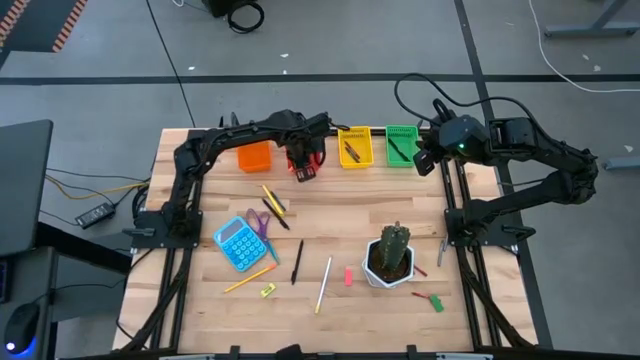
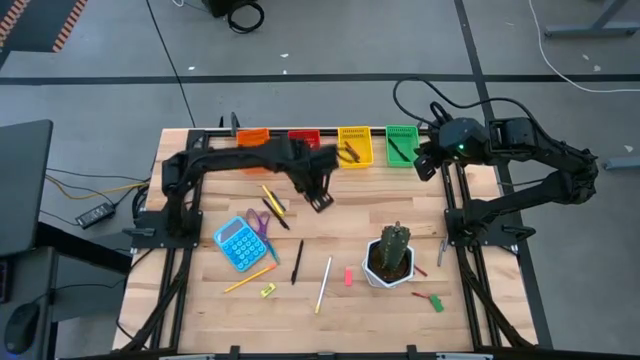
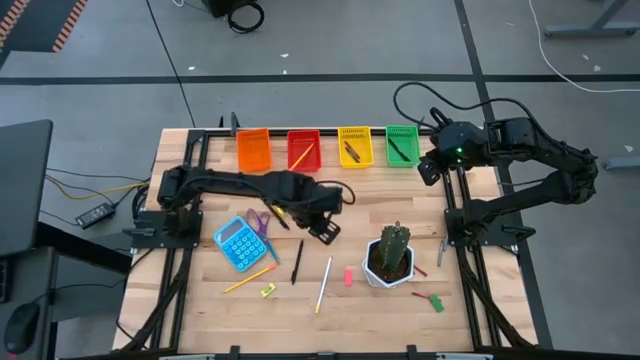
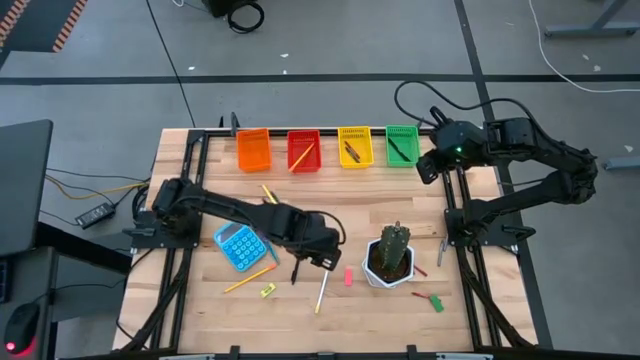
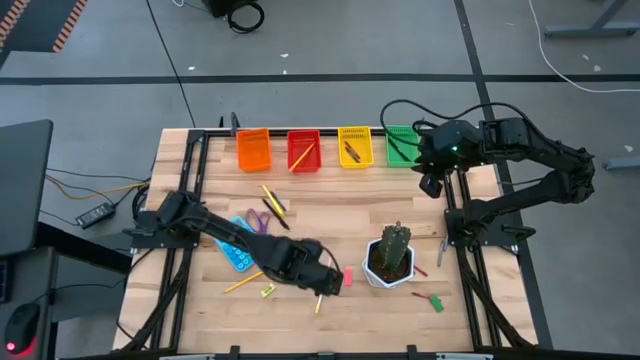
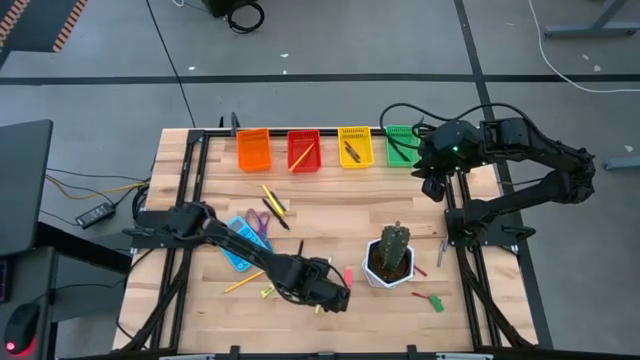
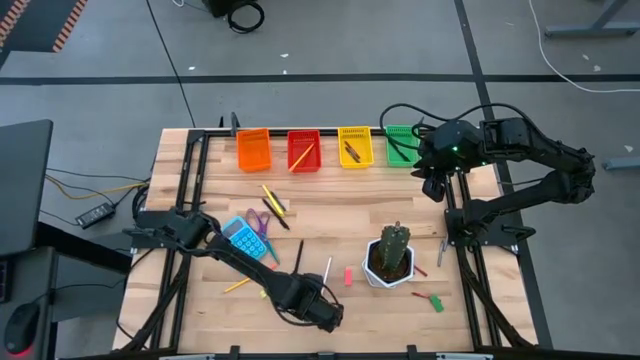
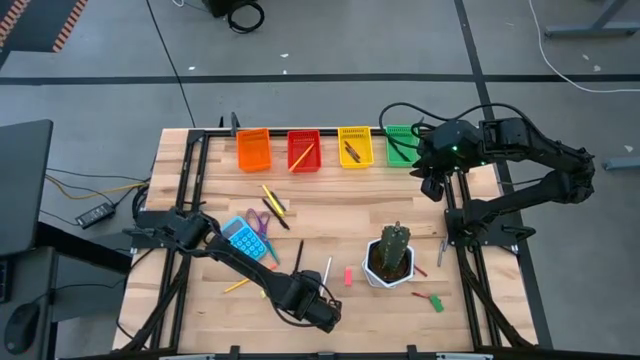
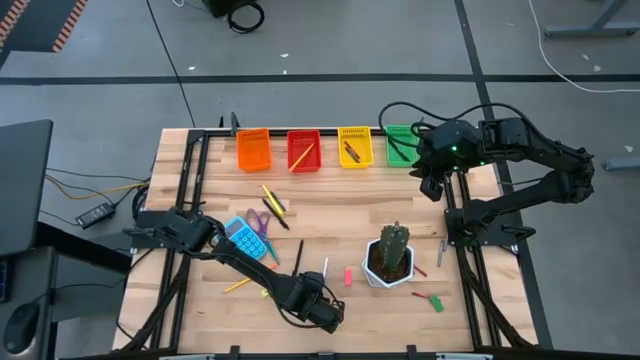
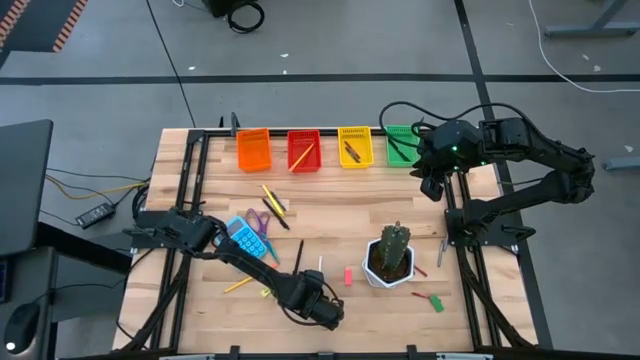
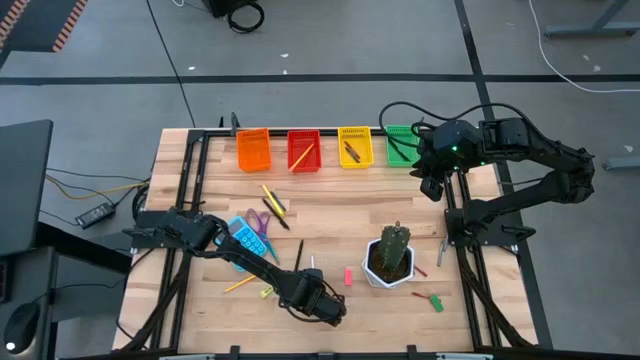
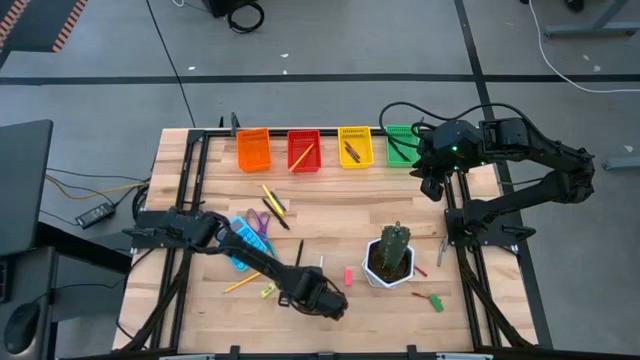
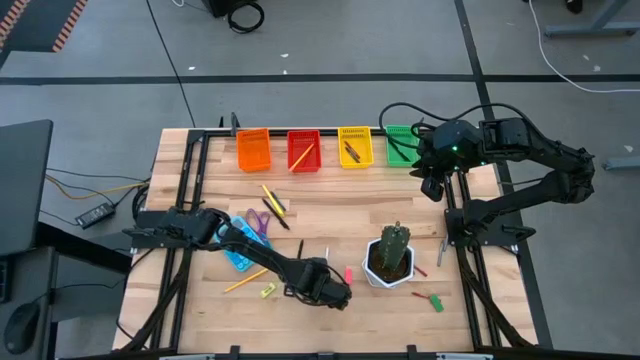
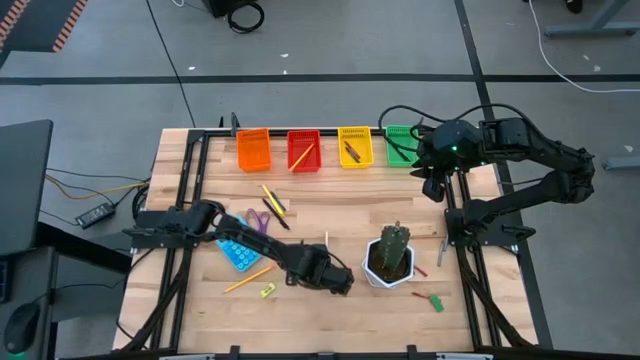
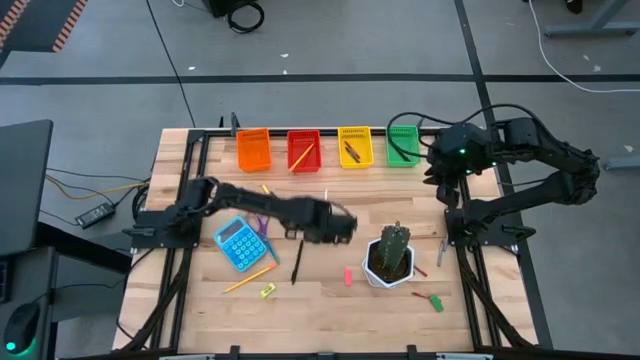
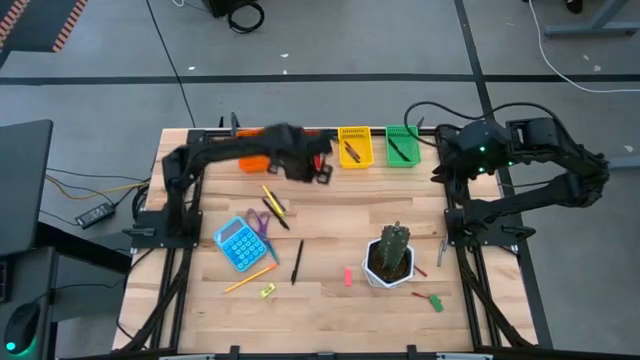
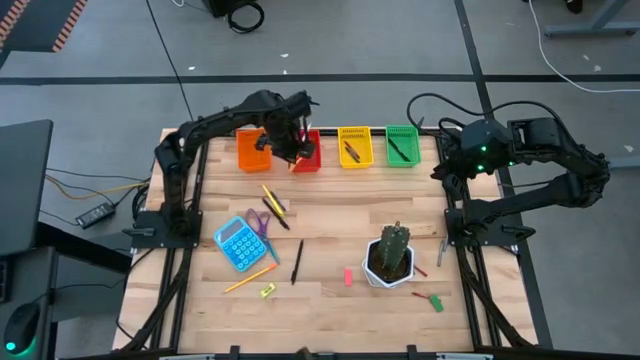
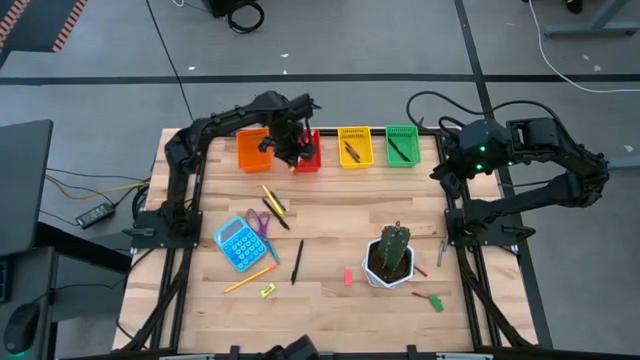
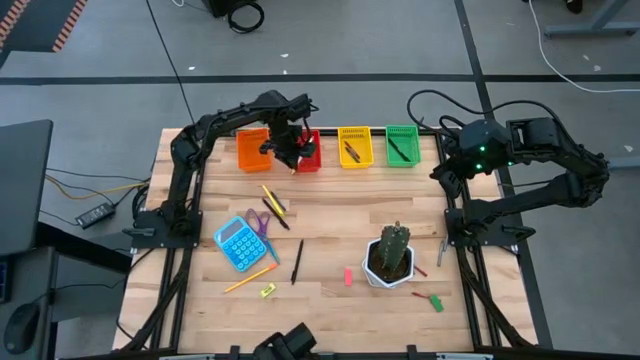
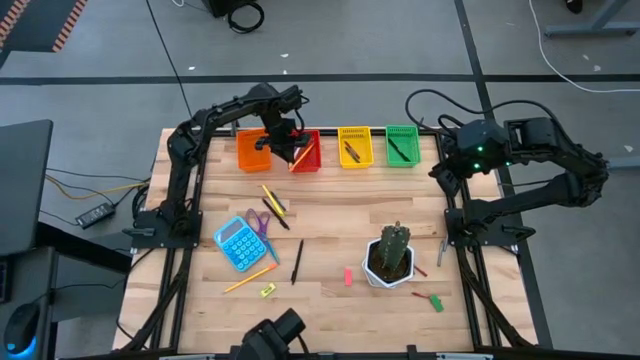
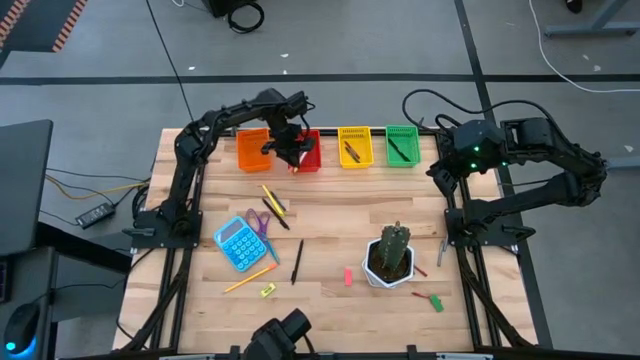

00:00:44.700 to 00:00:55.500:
Task: Sort crayons/erasers/pens/pencils in bins
Put the white pencil into the red bin

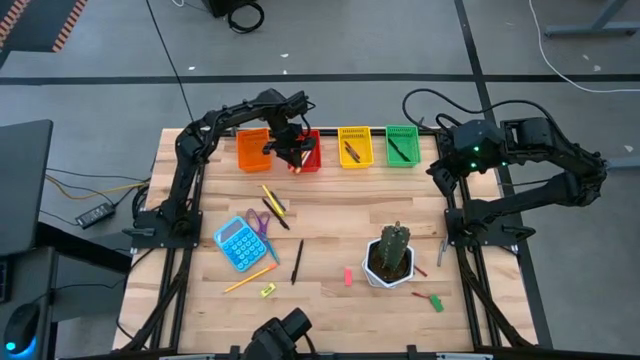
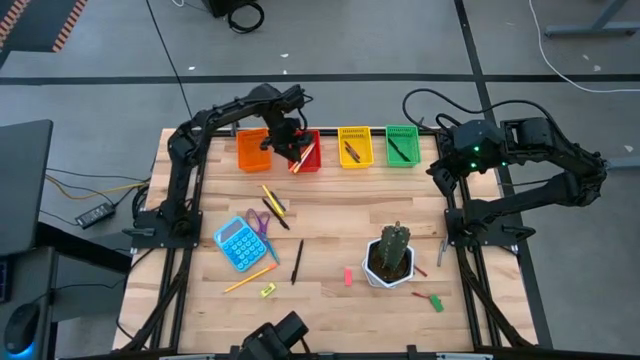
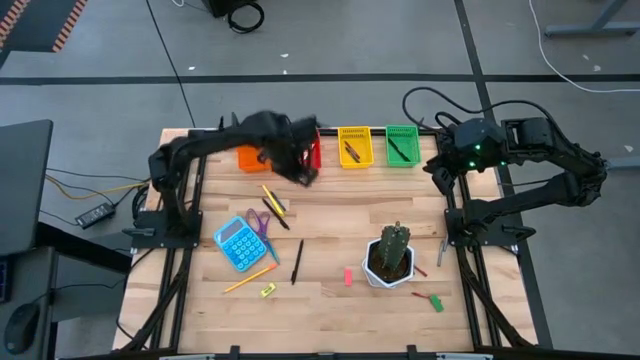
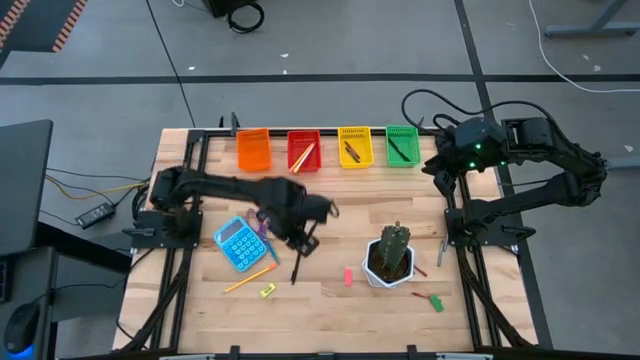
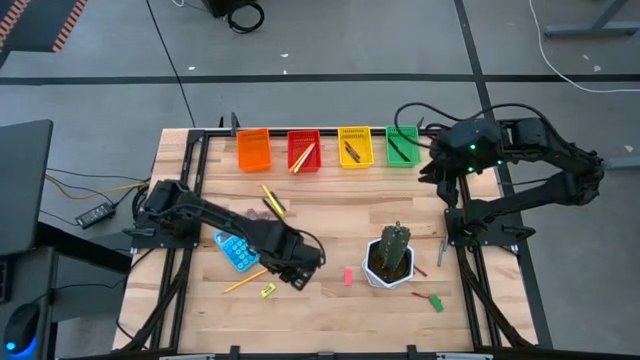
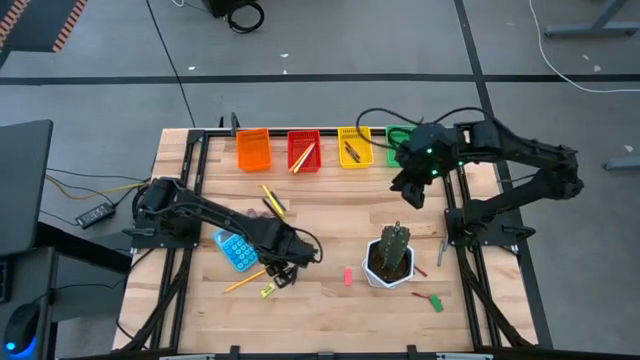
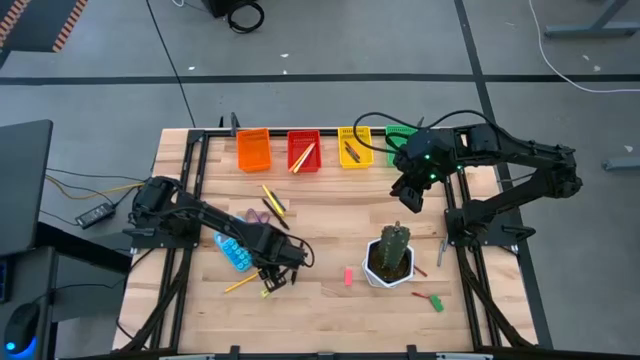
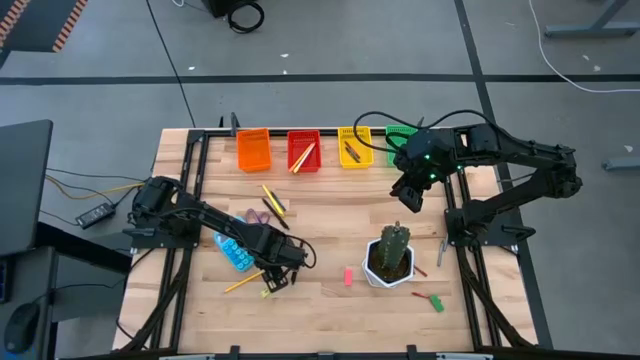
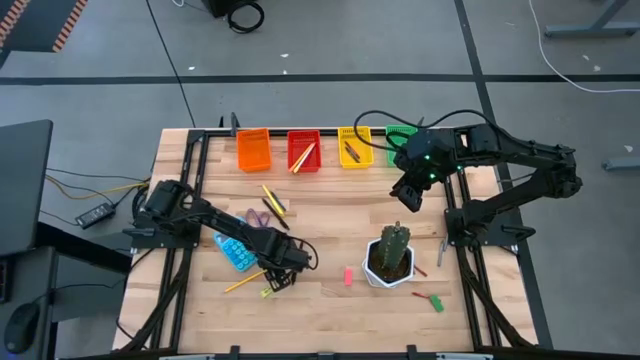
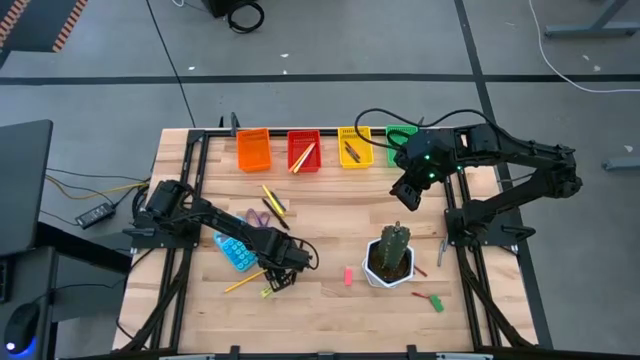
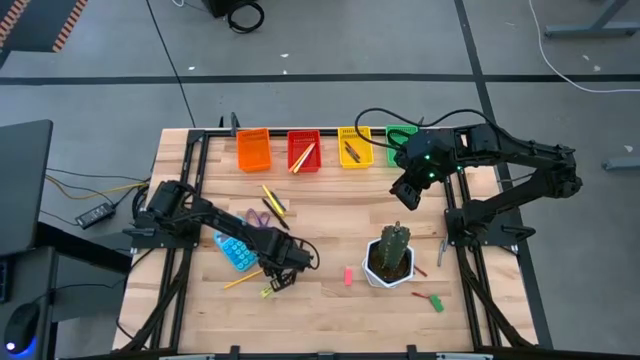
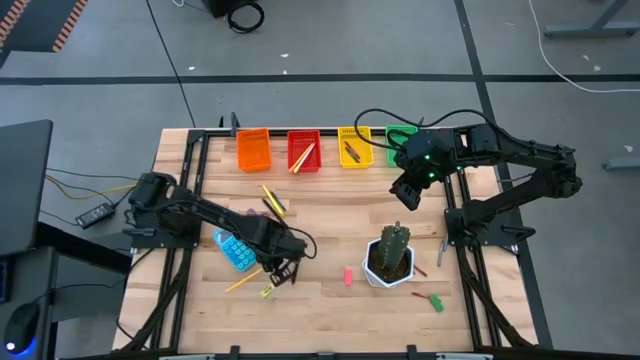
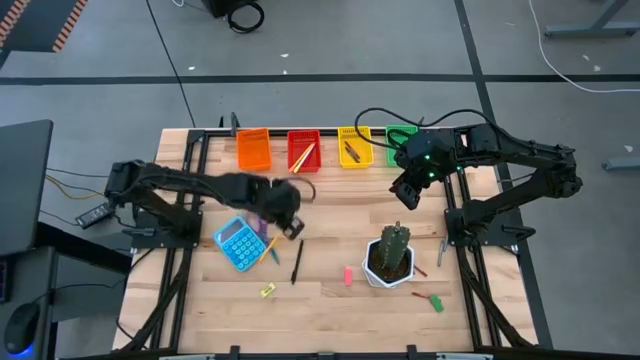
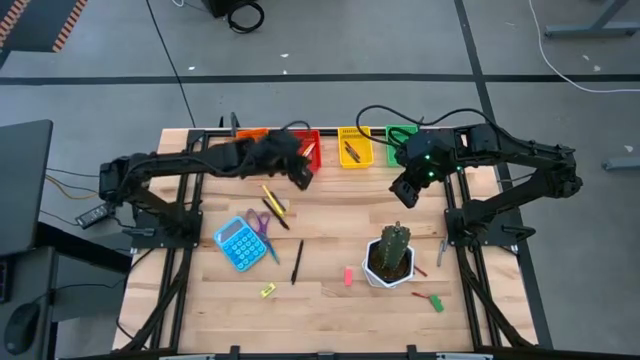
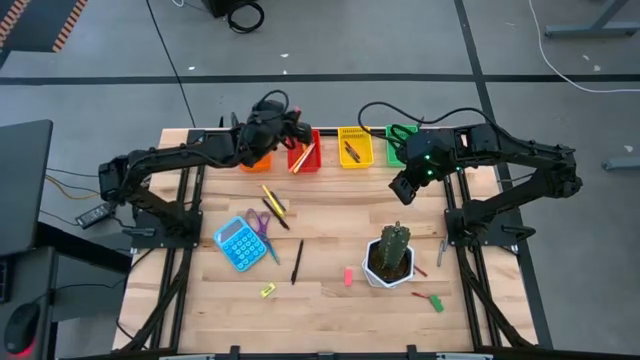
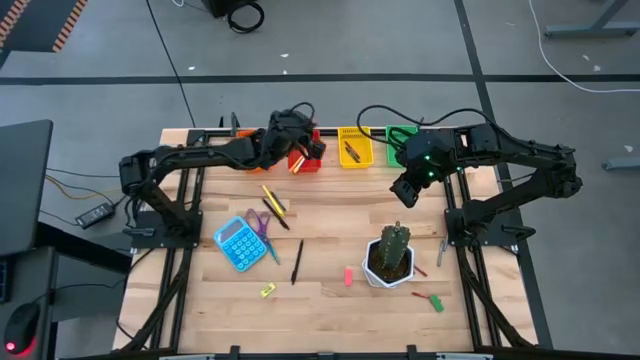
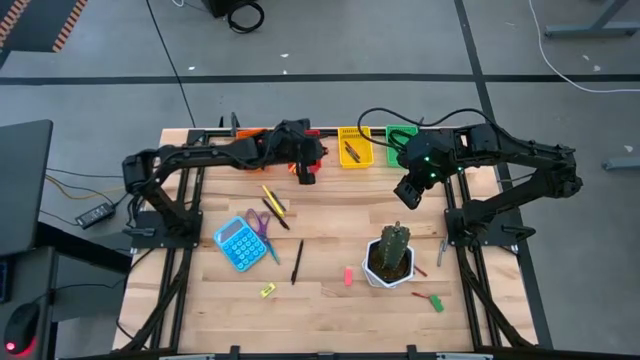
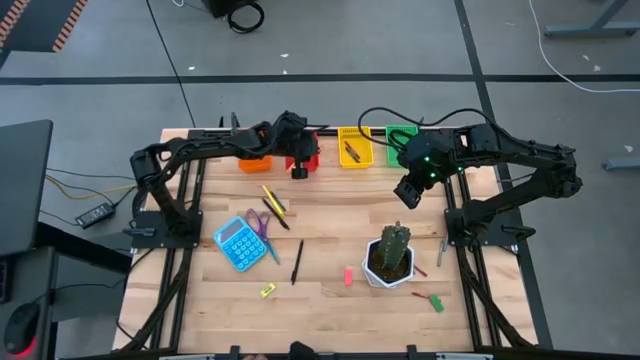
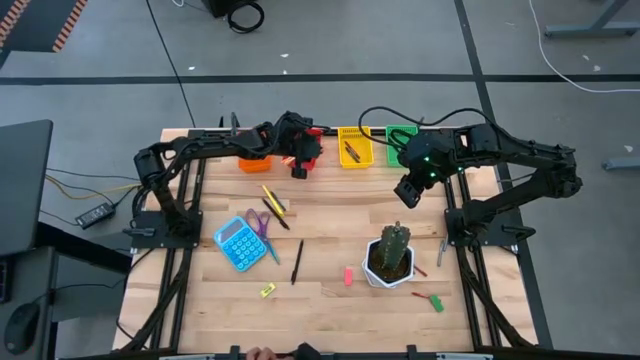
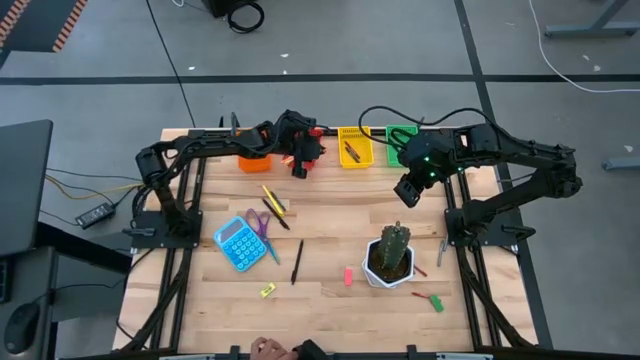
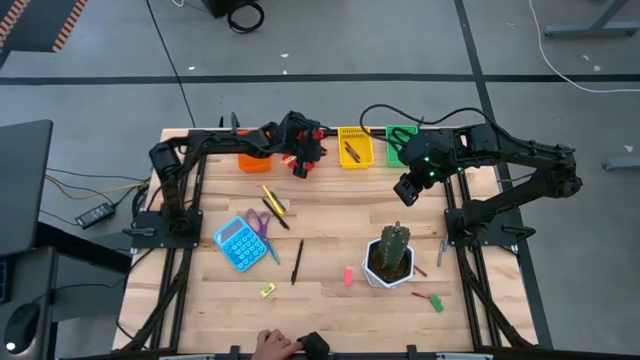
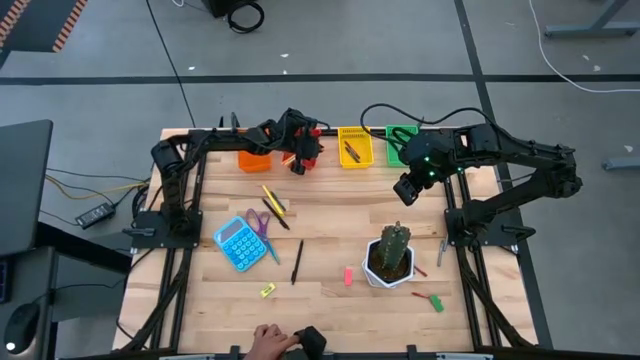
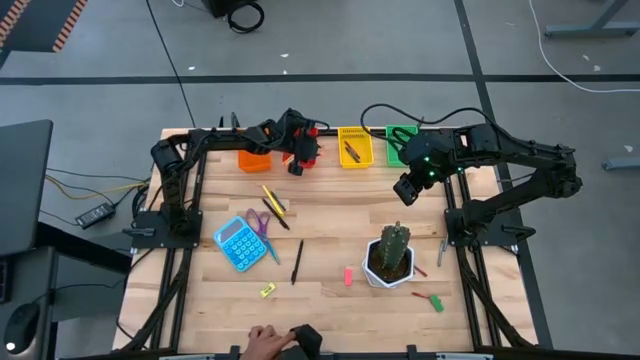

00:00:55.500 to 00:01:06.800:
Put the yellow pencil into the red bin
